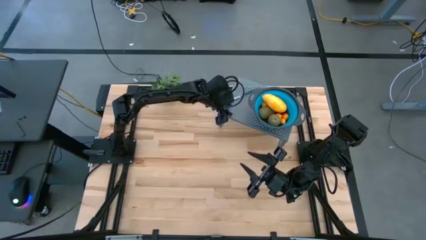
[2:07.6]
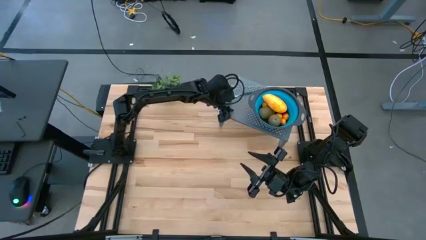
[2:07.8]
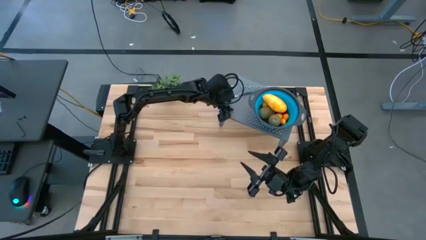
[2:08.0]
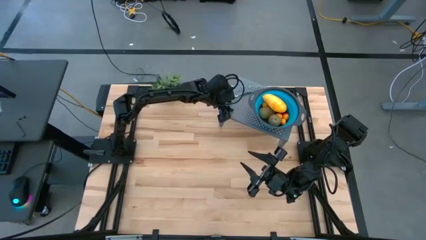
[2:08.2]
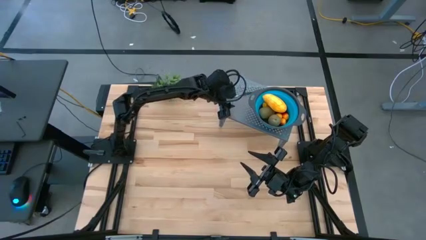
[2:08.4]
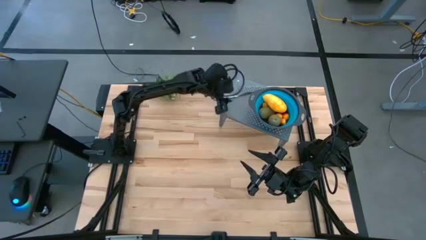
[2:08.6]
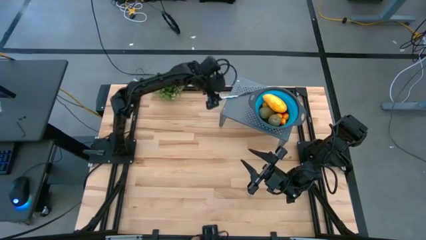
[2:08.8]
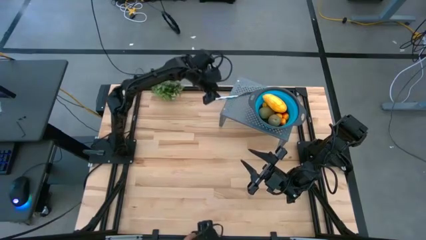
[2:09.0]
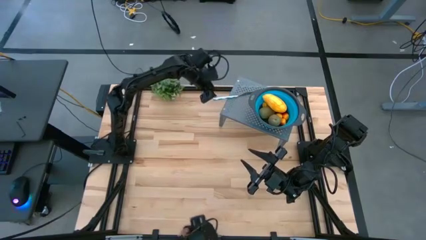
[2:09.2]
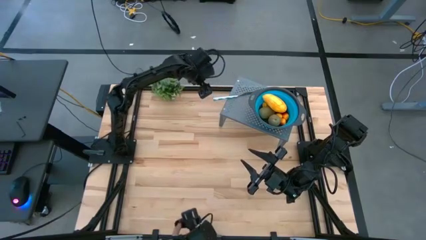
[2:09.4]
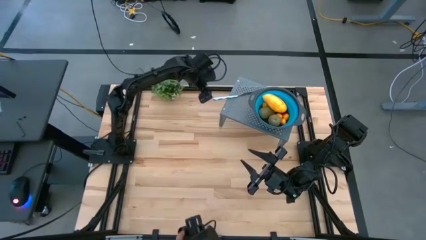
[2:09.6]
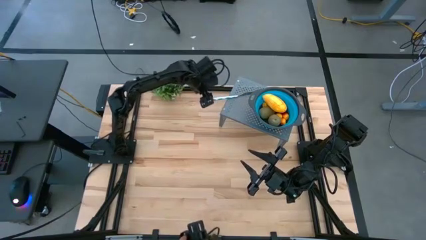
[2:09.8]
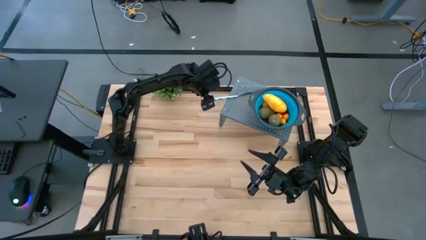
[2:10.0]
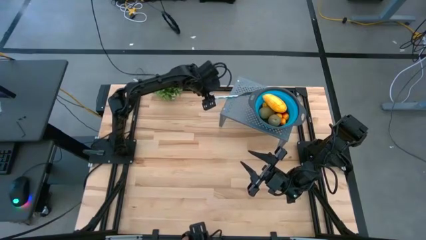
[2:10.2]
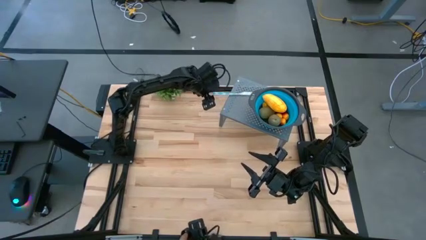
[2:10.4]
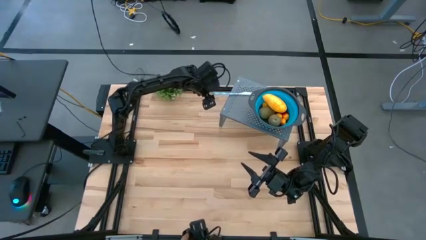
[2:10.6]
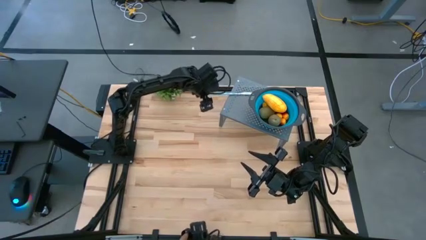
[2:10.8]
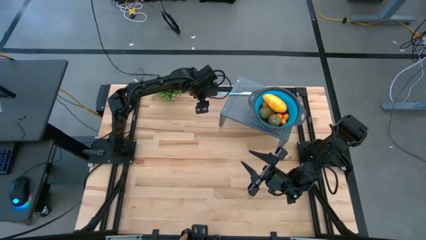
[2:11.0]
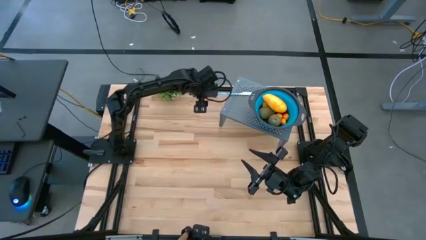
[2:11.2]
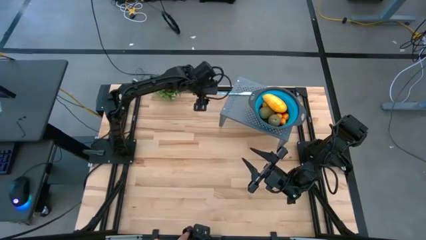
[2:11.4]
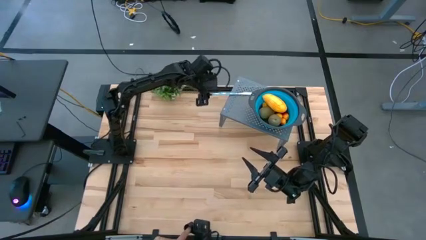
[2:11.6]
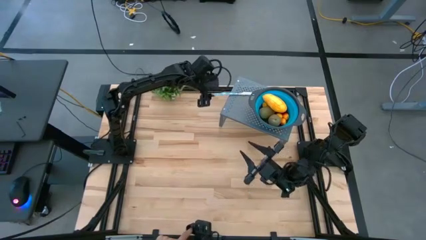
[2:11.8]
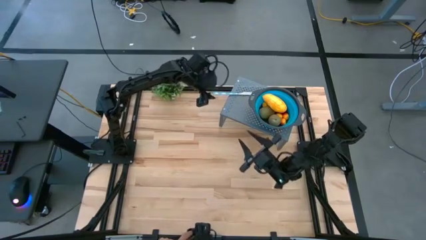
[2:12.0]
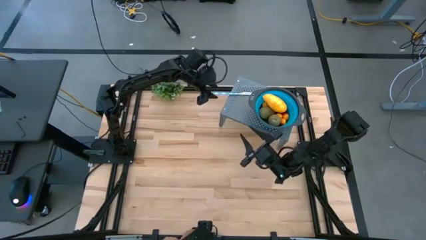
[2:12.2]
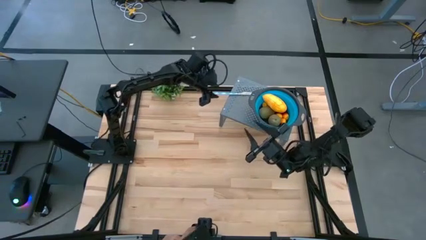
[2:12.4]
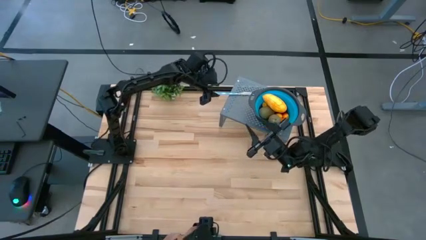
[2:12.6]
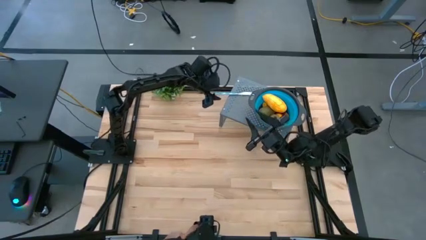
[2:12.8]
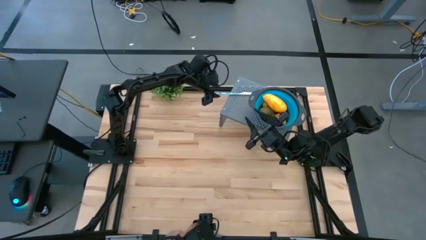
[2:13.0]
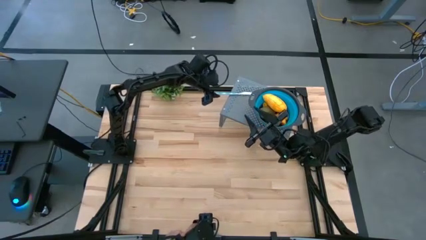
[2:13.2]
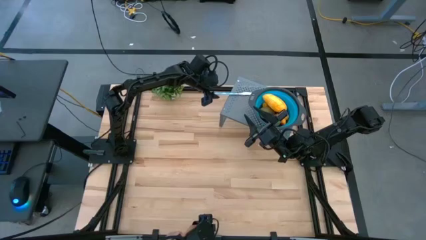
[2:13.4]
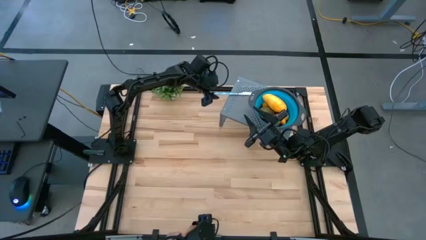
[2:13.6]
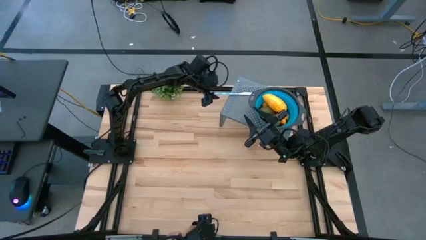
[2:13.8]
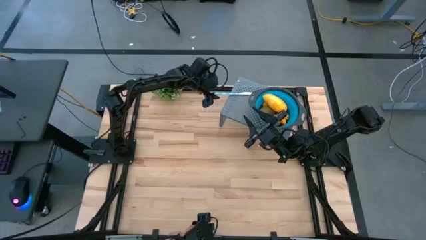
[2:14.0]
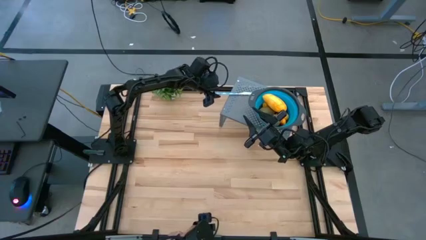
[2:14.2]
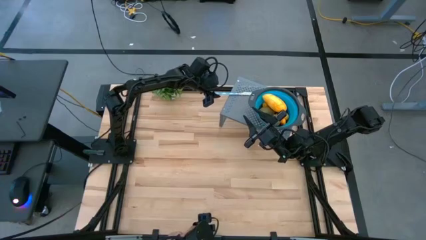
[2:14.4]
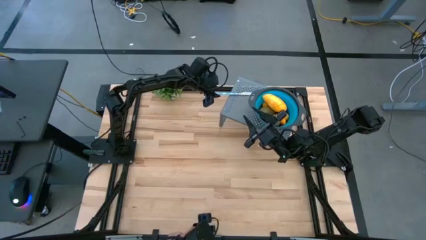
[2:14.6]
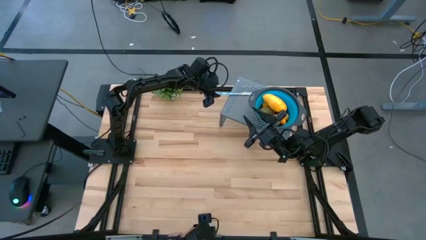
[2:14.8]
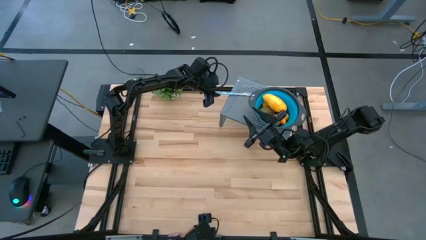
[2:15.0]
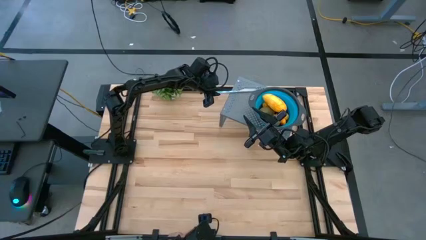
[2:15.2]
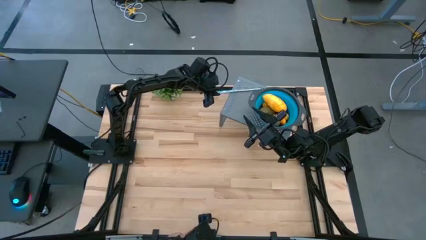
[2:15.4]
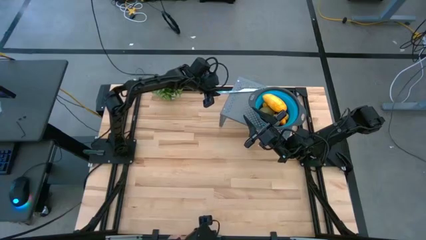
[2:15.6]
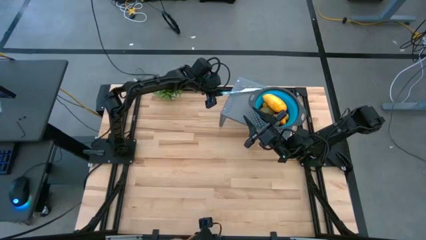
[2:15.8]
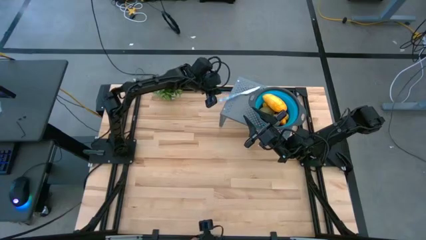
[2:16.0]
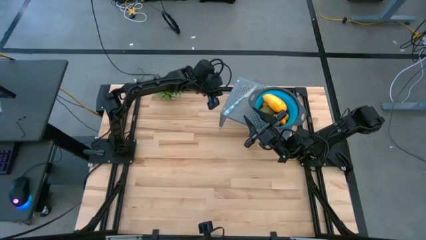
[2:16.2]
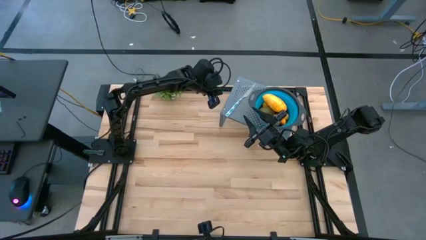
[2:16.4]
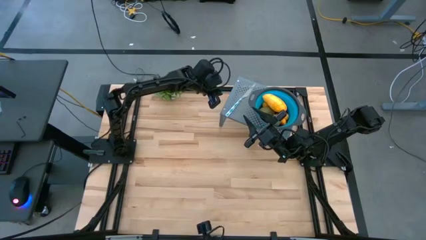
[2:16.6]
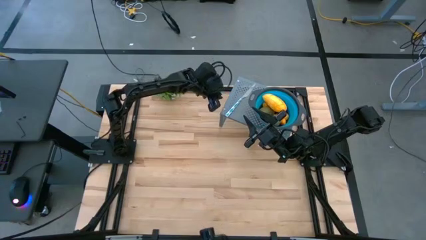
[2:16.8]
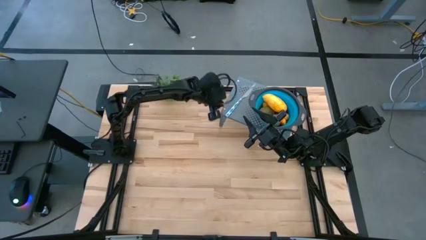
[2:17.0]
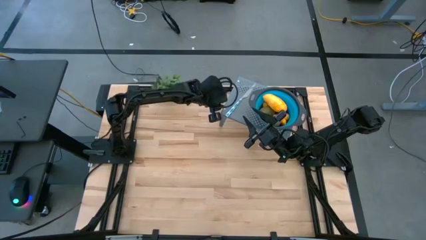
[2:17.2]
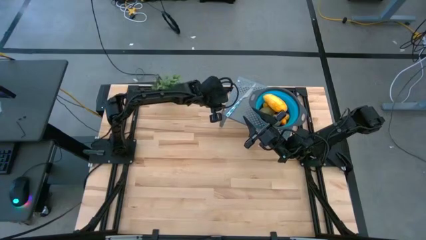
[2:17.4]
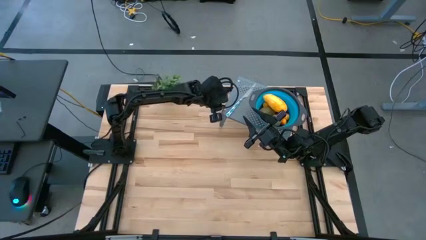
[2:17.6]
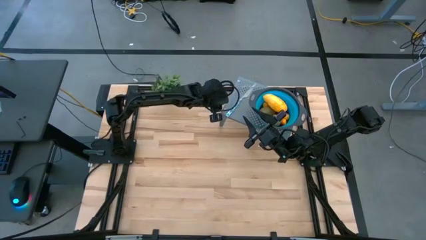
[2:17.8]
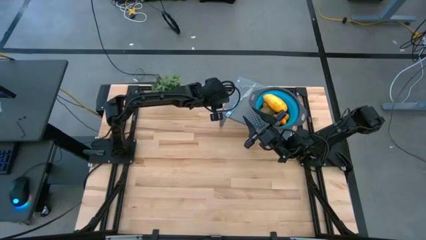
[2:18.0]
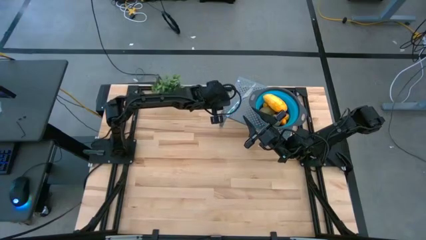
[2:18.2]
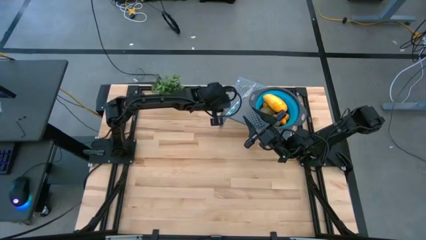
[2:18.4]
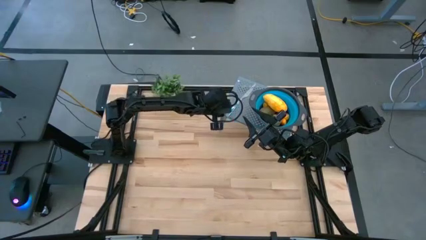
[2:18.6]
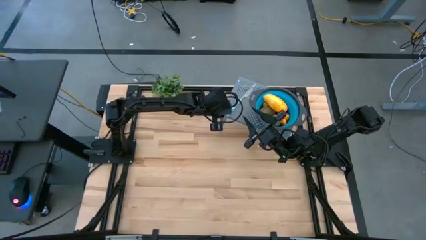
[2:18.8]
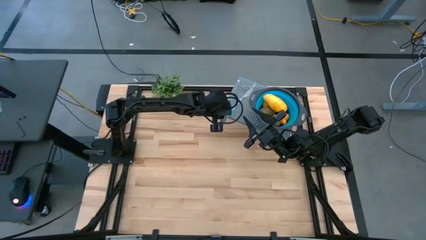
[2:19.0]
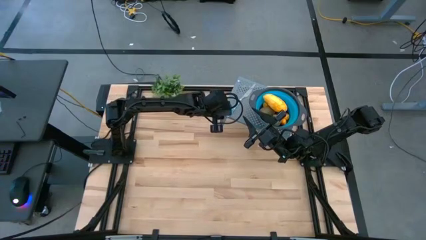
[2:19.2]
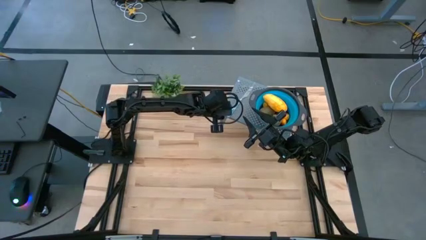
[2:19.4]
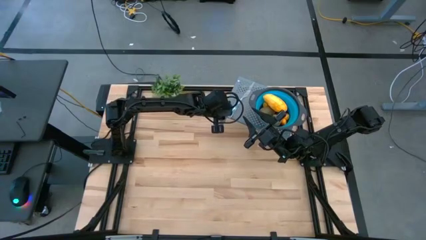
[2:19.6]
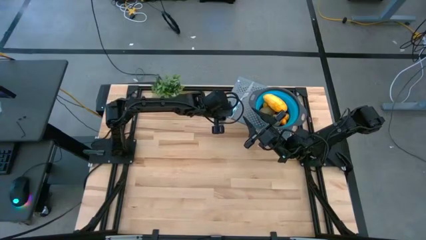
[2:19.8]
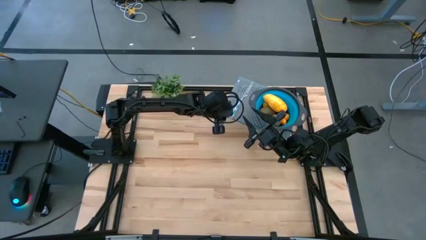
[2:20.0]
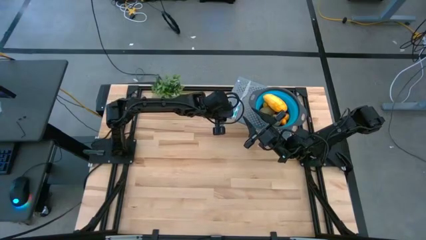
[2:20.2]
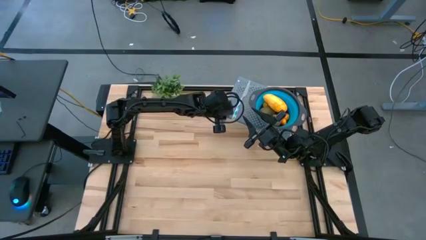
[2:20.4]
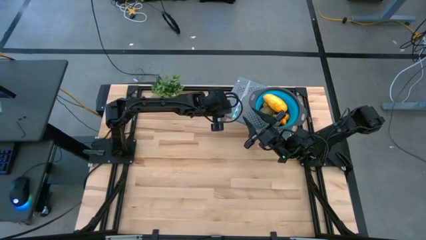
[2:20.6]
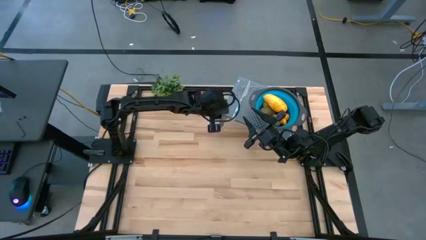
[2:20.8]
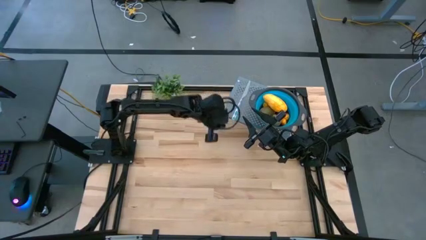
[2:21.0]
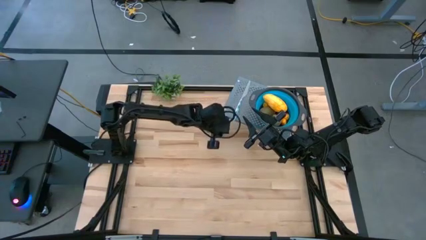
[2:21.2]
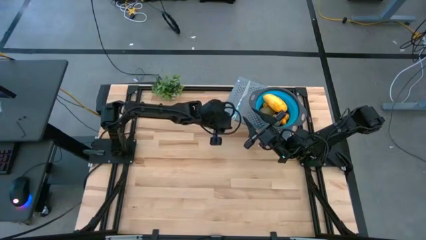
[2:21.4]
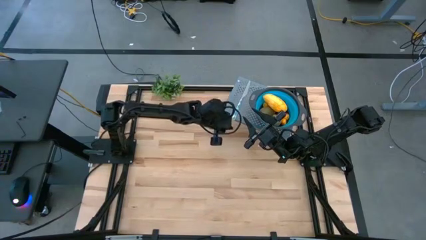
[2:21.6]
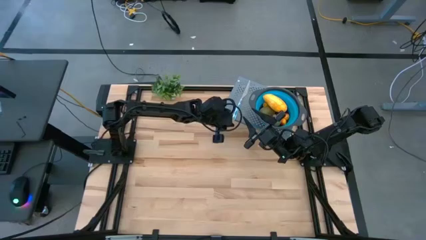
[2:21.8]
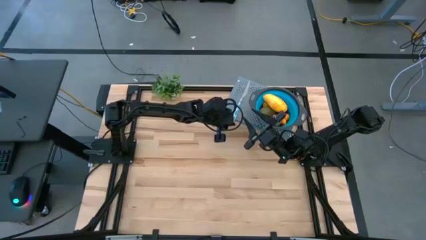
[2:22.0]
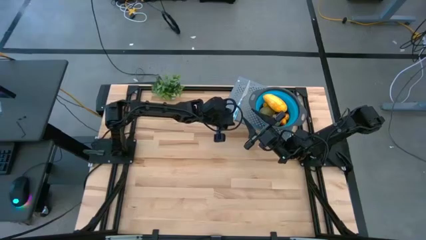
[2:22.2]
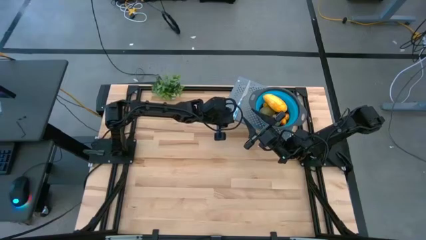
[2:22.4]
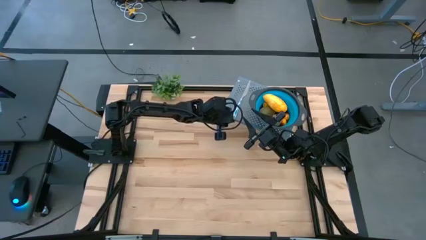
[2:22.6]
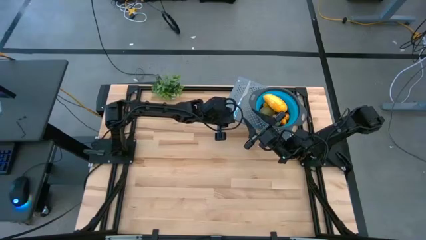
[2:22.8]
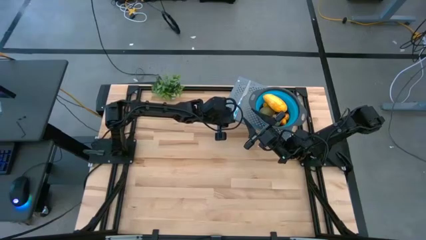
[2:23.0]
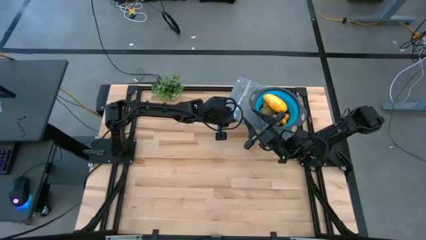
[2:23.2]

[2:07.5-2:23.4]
Task: Pick & Place Fruit
Put the green patterned knife on the shelf
